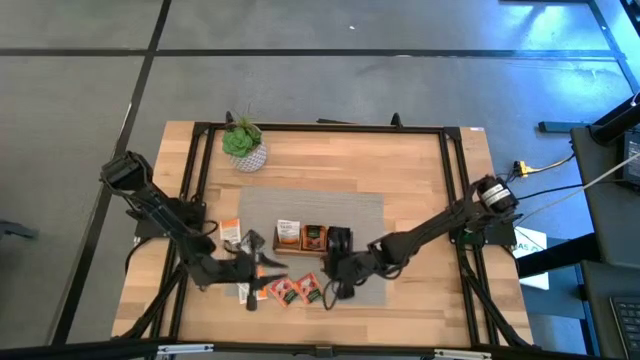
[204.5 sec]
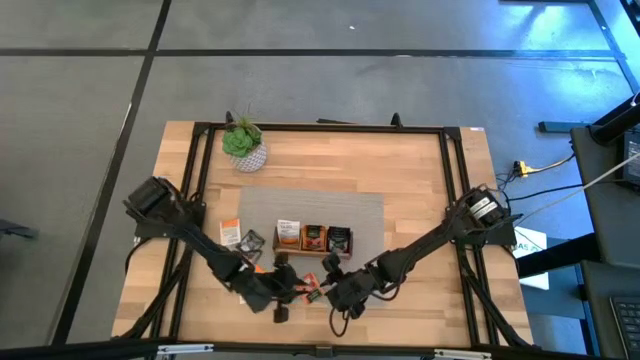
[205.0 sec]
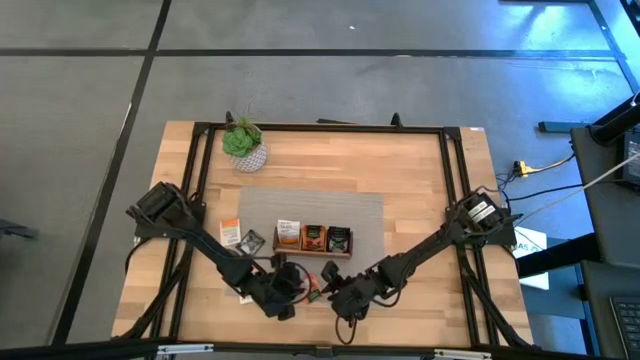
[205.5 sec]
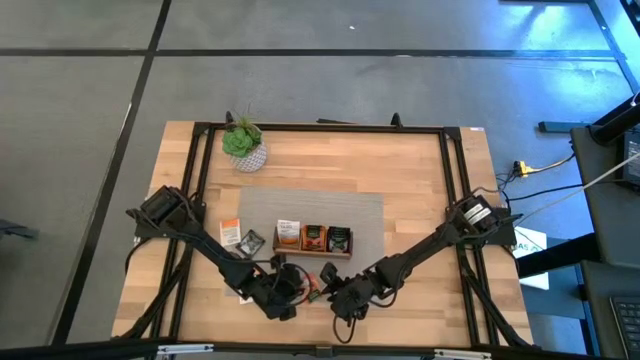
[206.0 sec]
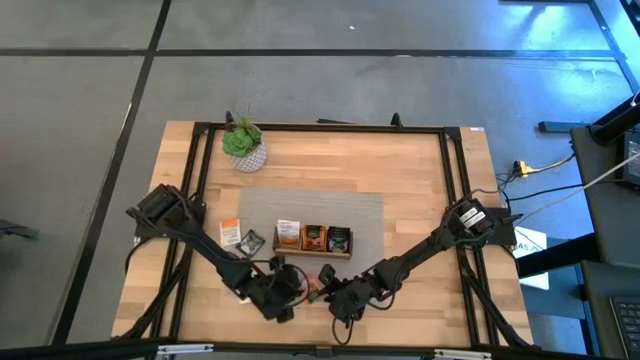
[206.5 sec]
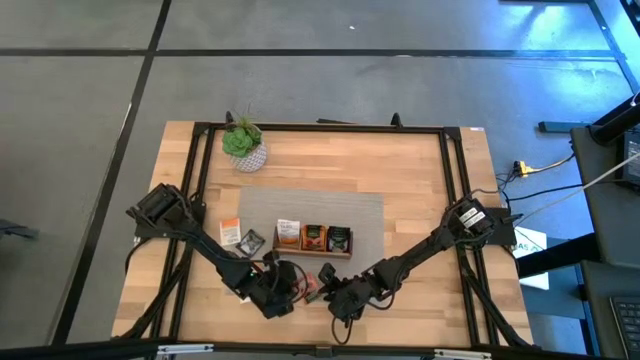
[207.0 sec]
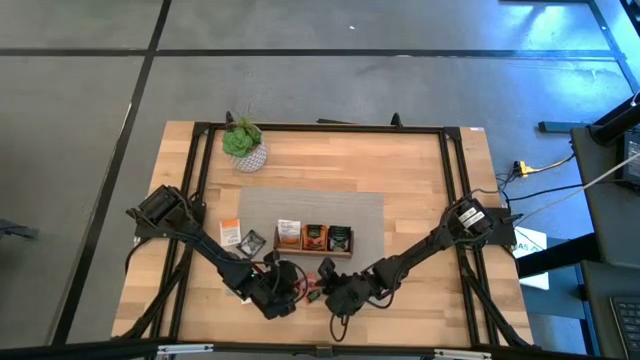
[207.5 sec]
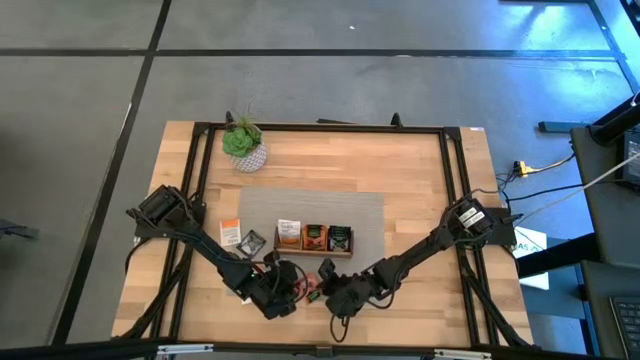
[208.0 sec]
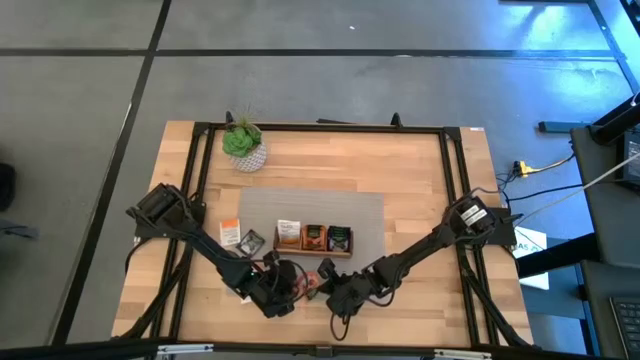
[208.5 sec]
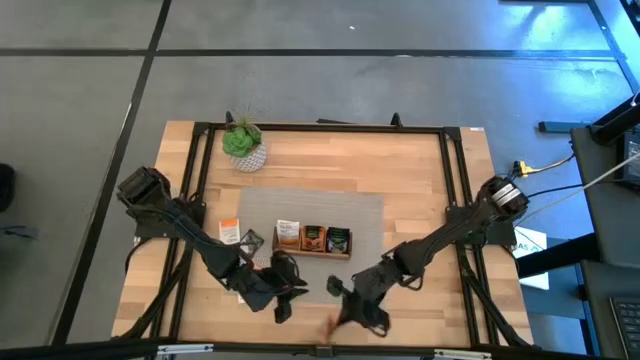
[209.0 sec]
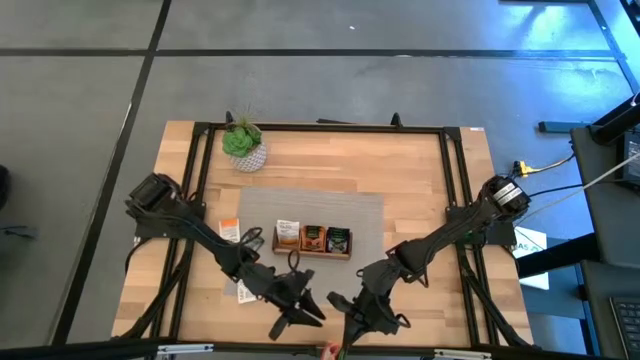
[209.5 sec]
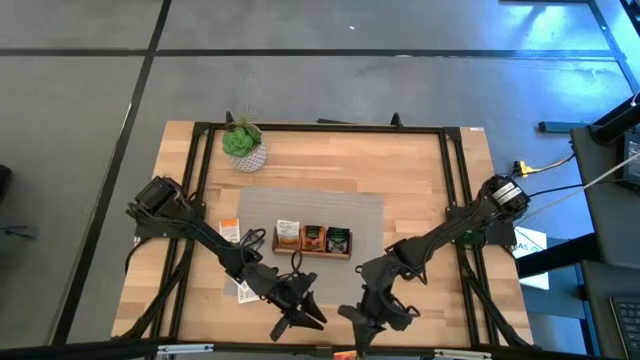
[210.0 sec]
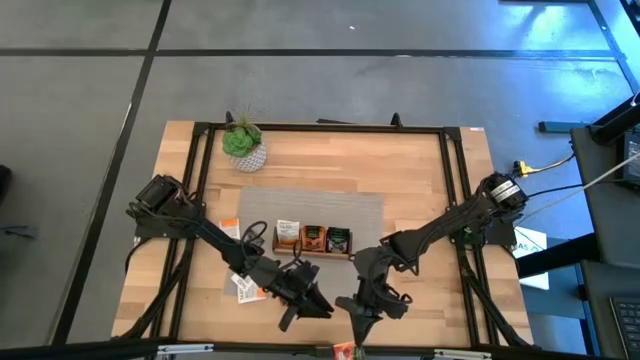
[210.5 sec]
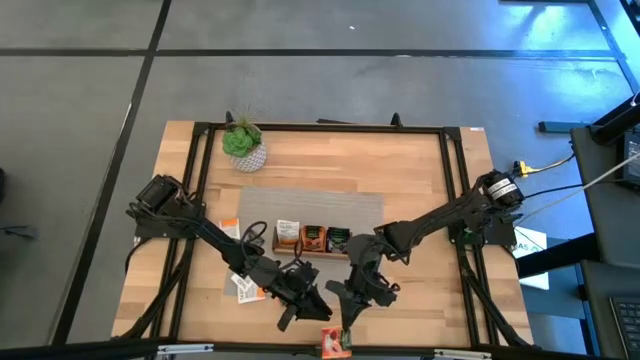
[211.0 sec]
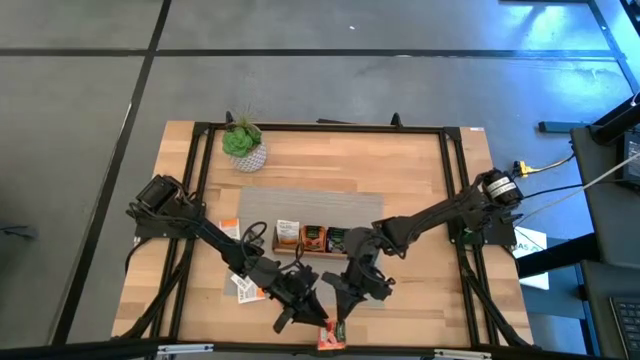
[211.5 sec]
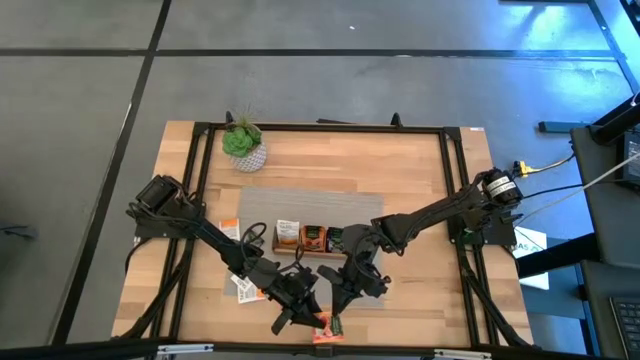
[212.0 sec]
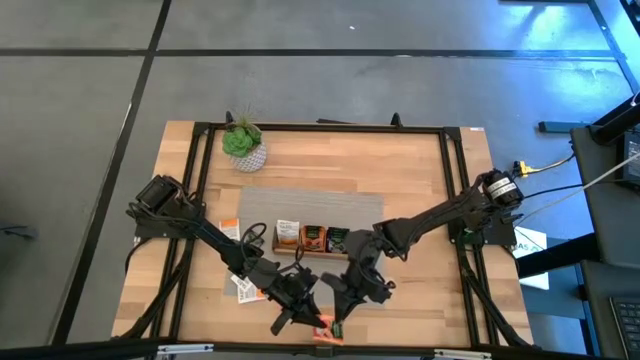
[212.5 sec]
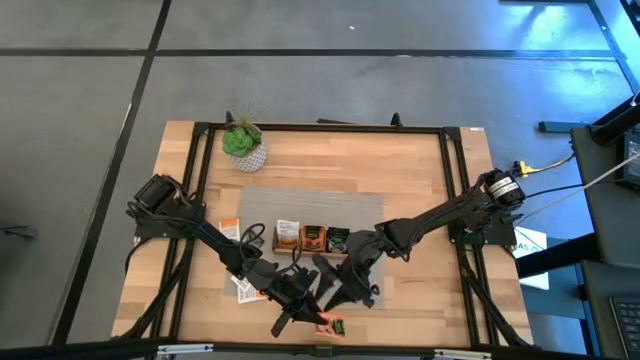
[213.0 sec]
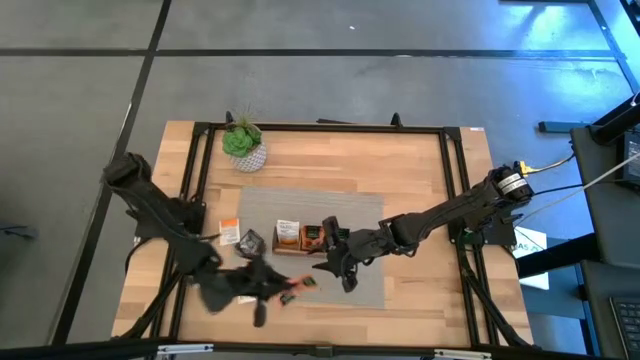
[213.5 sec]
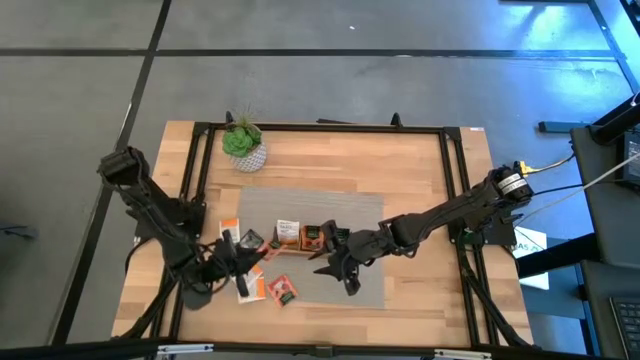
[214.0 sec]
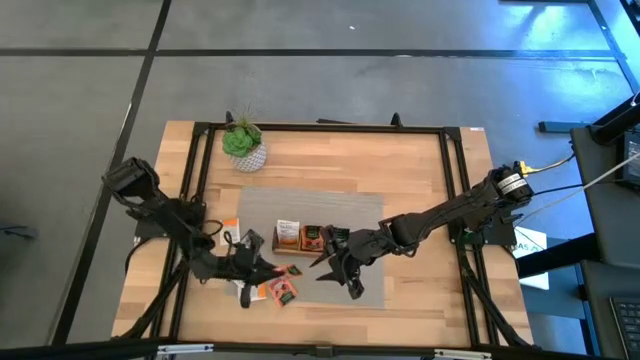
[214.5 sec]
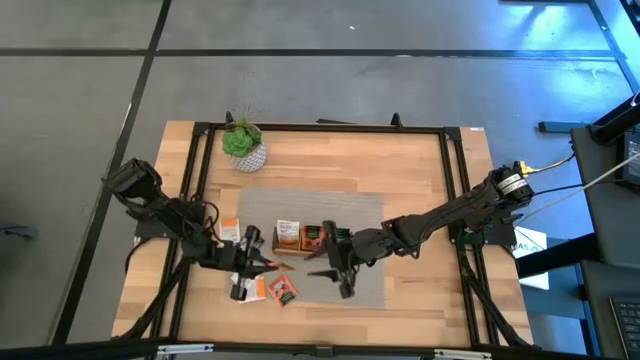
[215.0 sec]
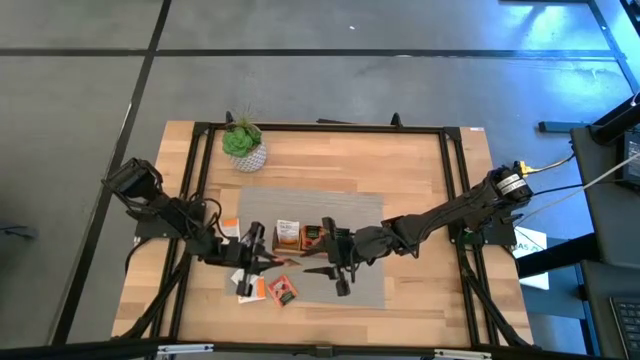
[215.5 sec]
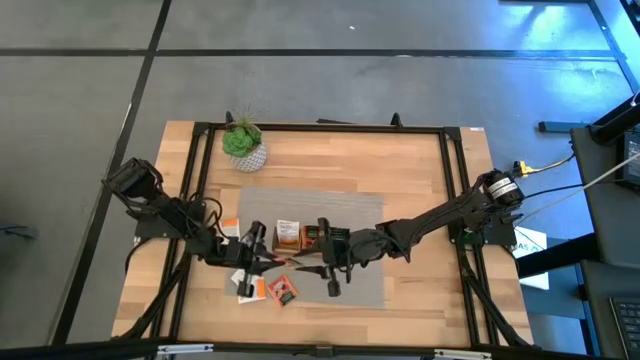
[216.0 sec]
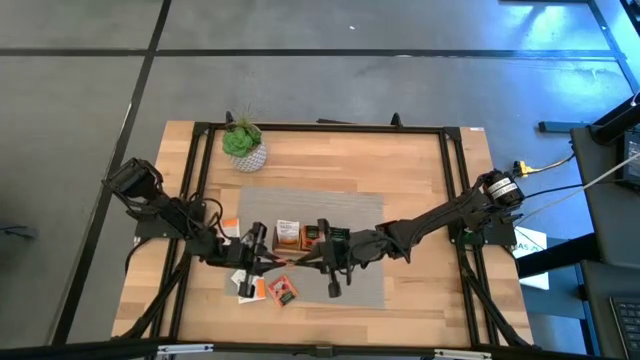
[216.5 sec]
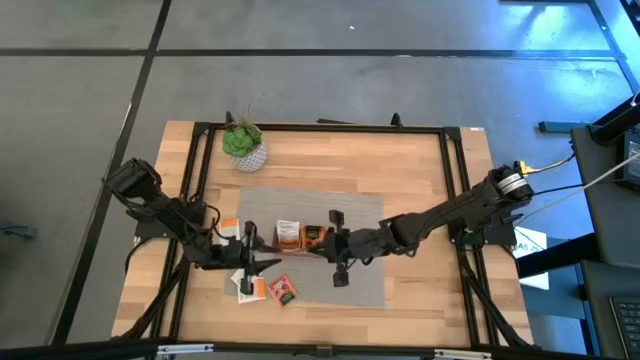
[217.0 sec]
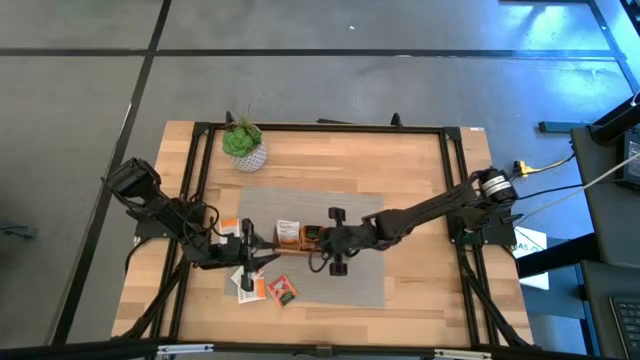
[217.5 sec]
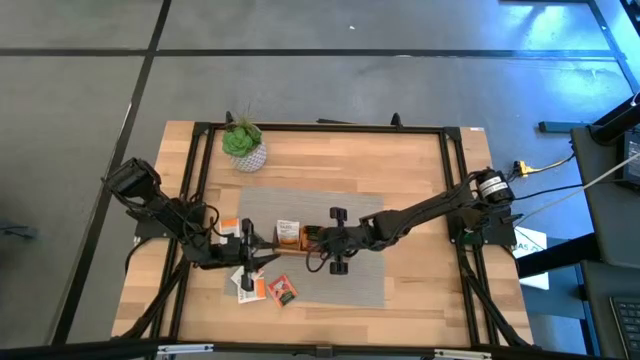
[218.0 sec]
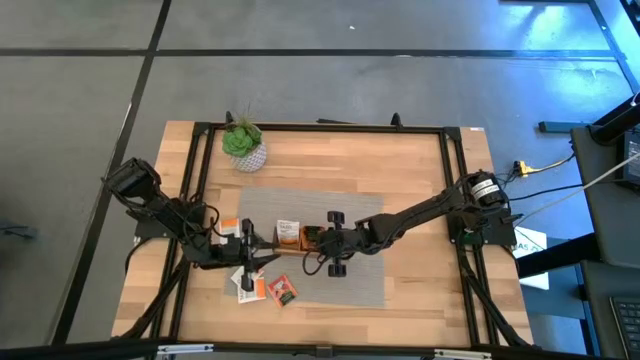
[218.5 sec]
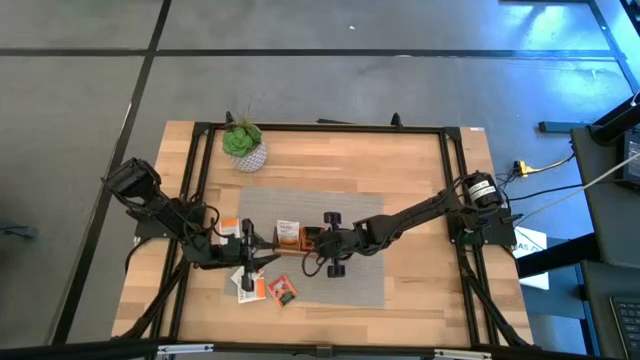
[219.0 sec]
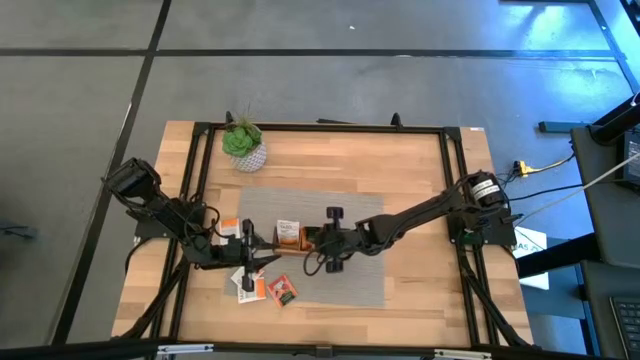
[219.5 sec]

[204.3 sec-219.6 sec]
Task: Pick & Place Tea
Put the orange tea bag into the middle section of the wooden organizer

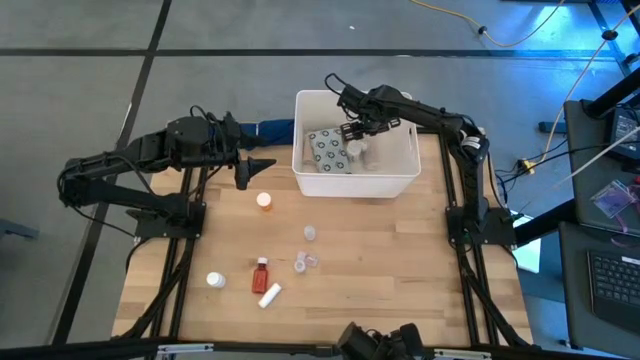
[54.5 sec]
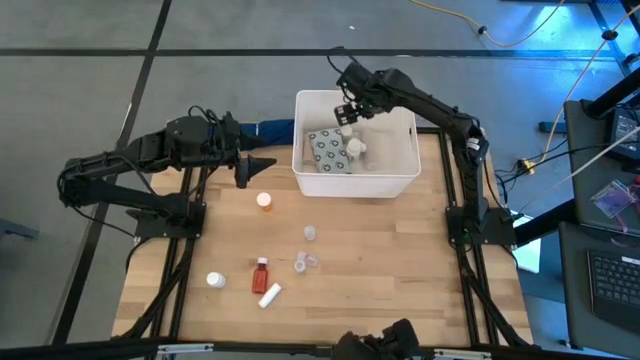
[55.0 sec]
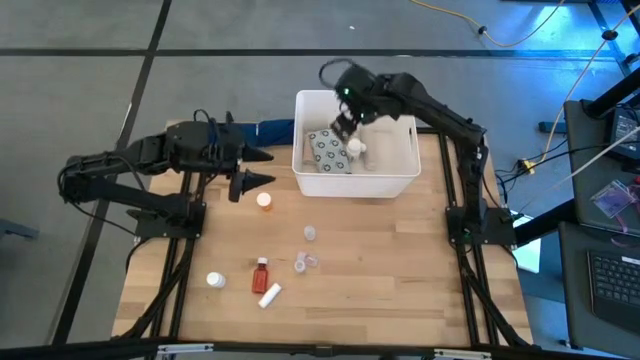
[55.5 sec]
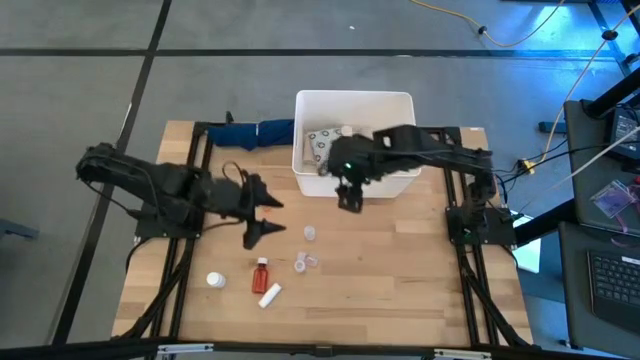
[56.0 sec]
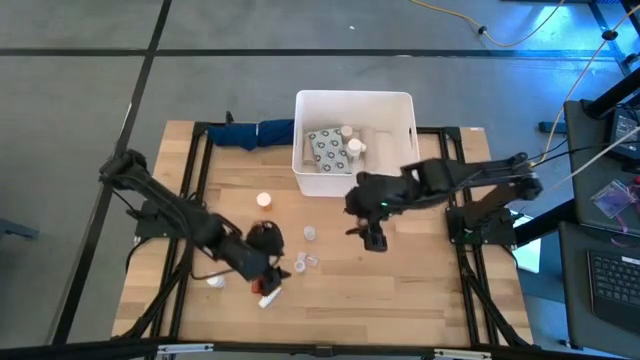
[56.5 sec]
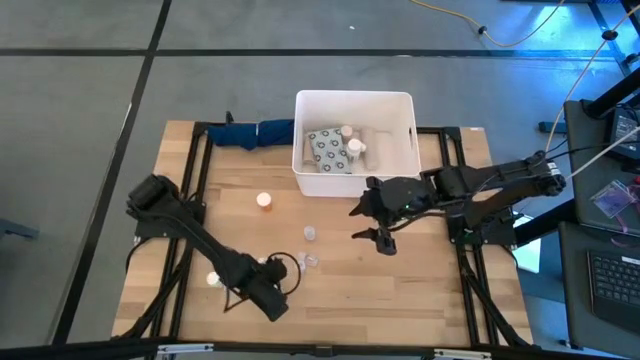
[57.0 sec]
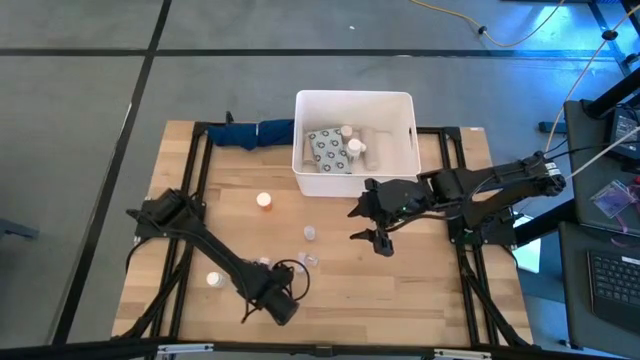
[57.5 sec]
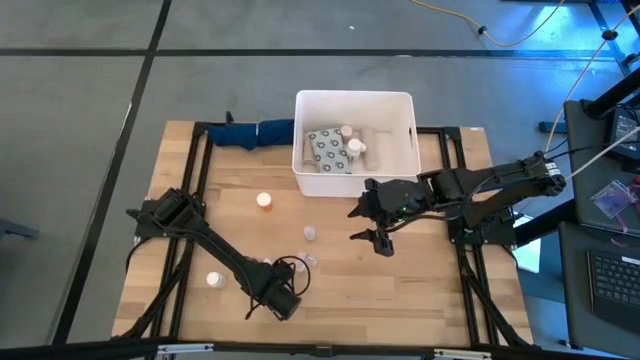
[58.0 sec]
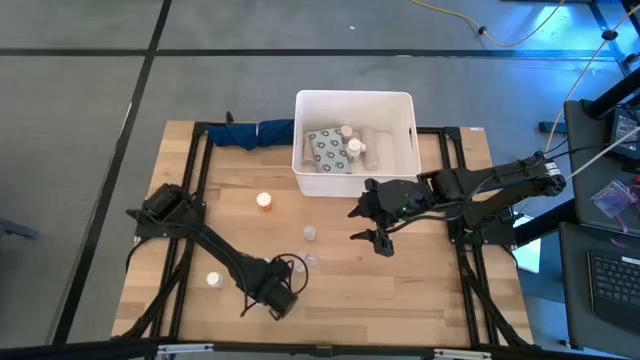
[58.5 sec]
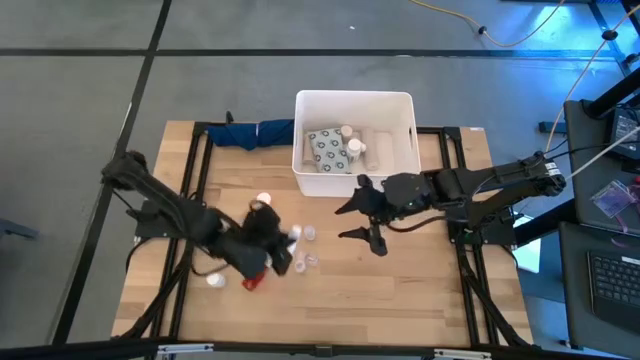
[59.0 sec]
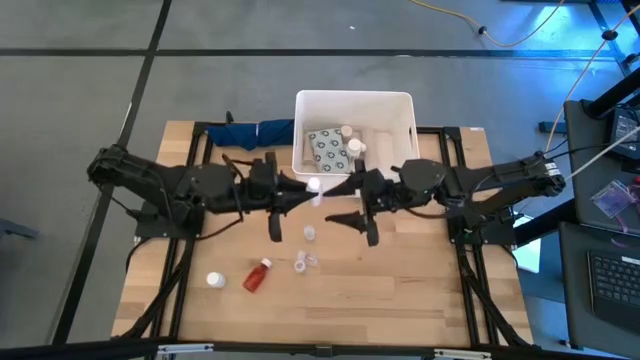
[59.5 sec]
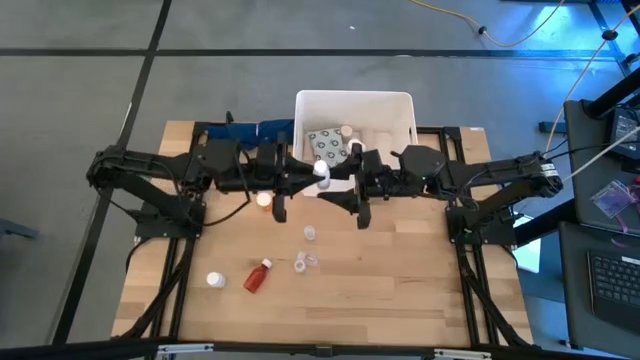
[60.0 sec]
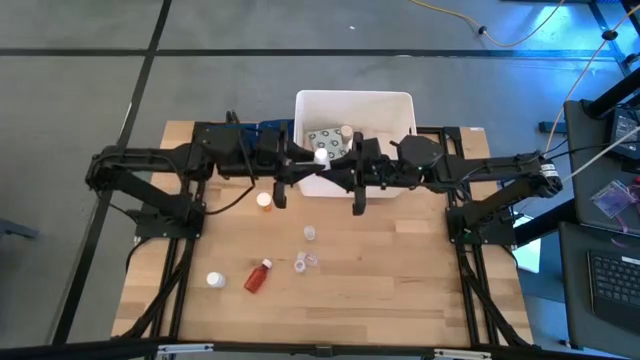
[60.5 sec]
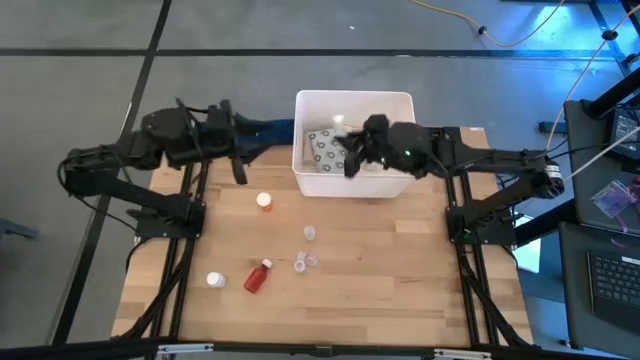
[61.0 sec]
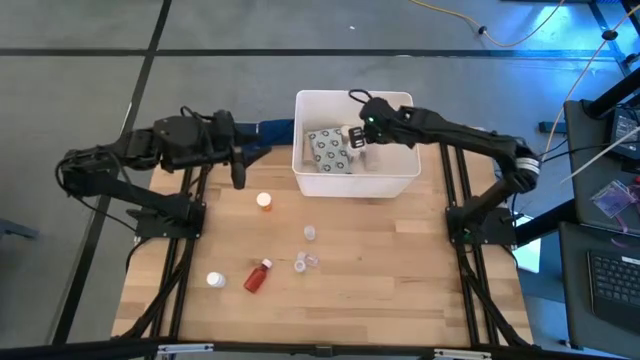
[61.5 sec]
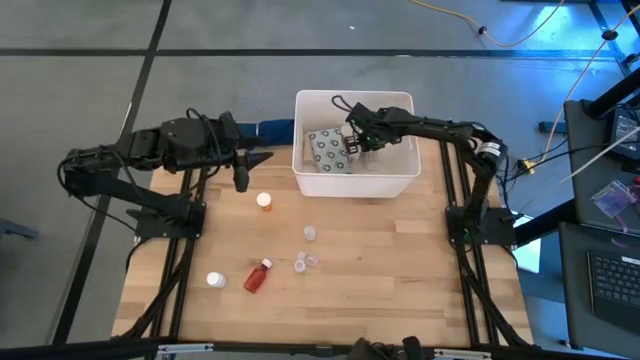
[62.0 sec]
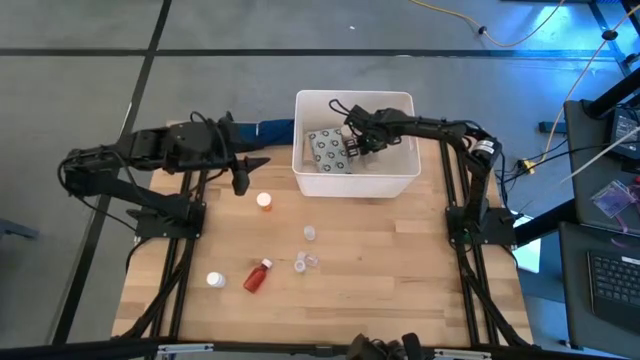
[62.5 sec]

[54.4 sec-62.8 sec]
Task: Pick & place medical supplies in basket/bin
Put the white rolled gauze into the white bin
